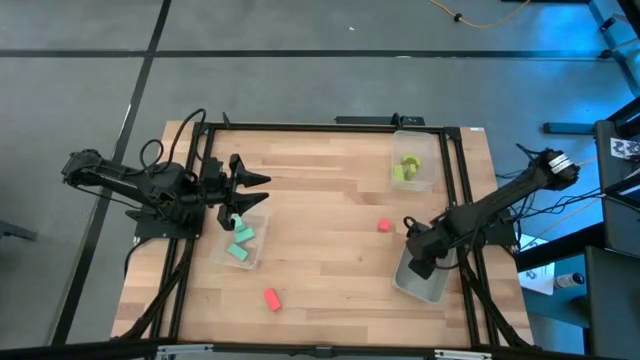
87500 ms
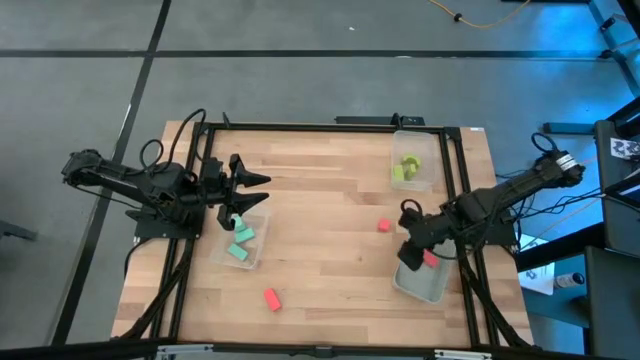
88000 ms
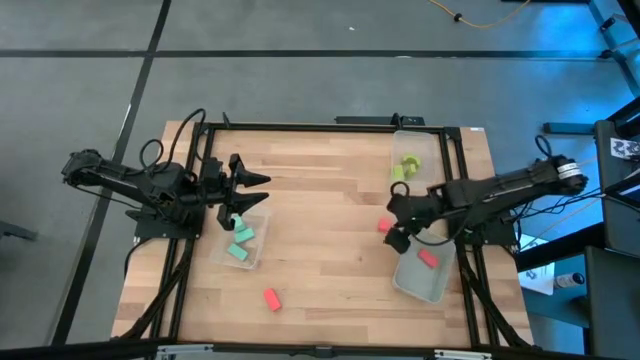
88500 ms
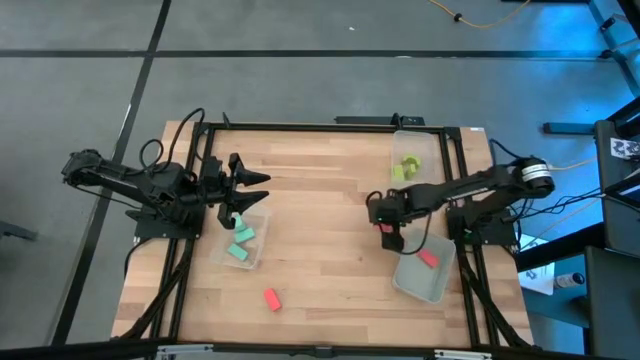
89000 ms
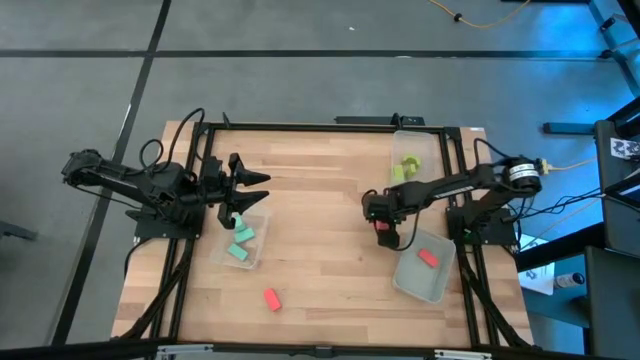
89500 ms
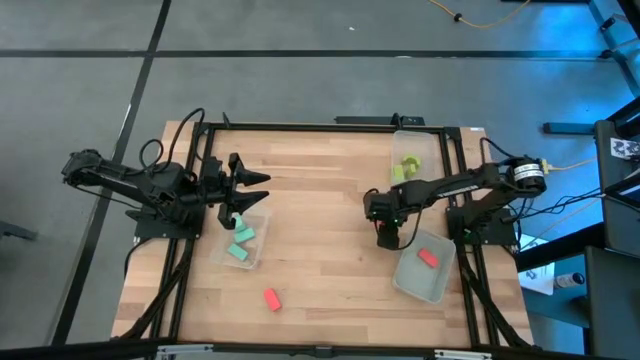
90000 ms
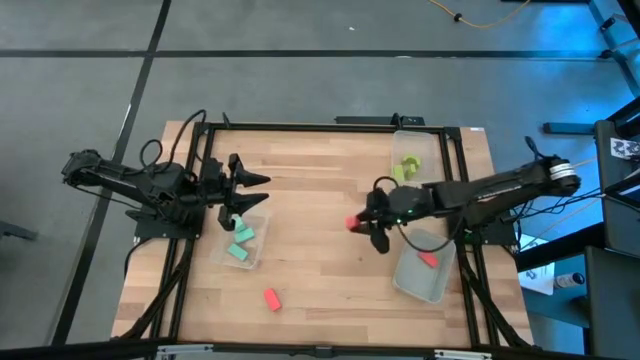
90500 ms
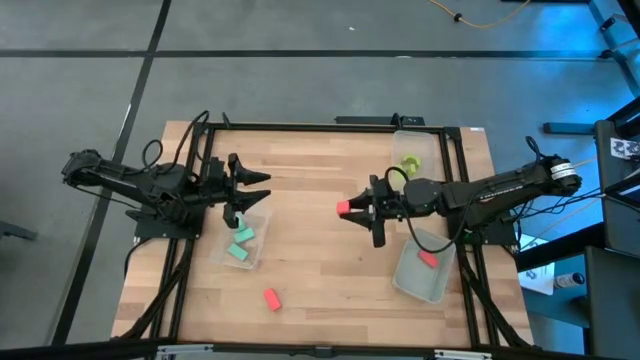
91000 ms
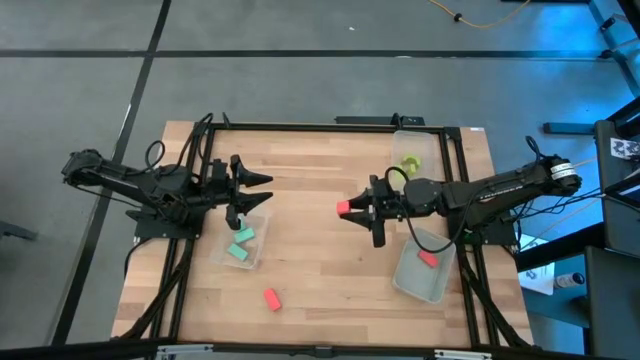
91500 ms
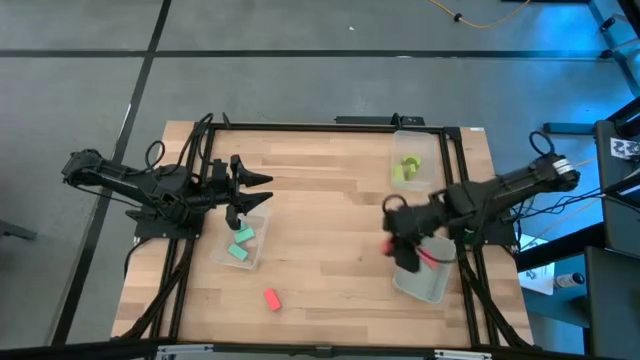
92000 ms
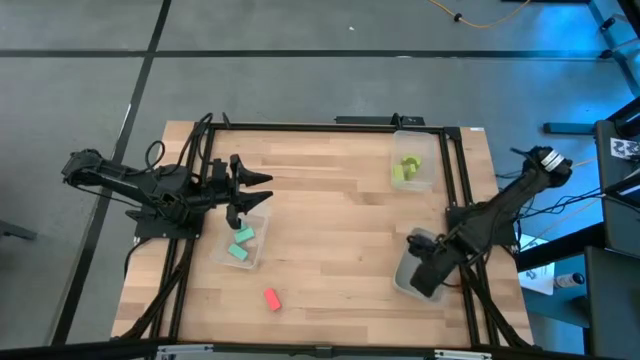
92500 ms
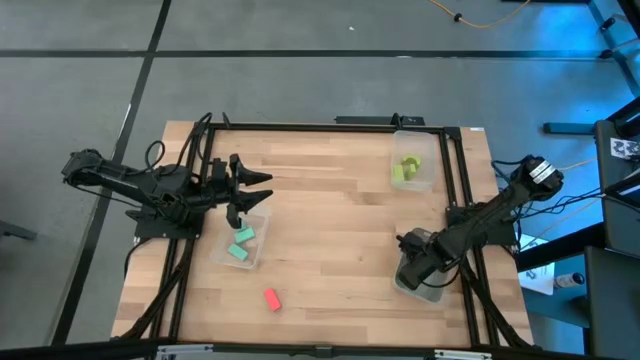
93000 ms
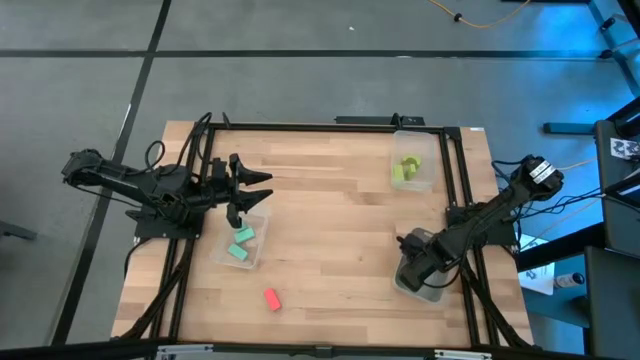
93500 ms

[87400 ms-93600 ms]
Task: Sort & place blocks by color
Put the top orange block into the gray bin

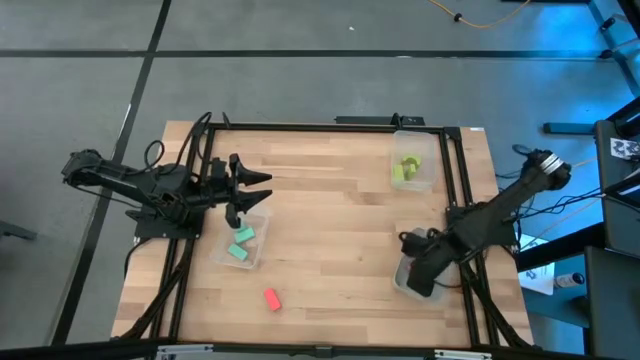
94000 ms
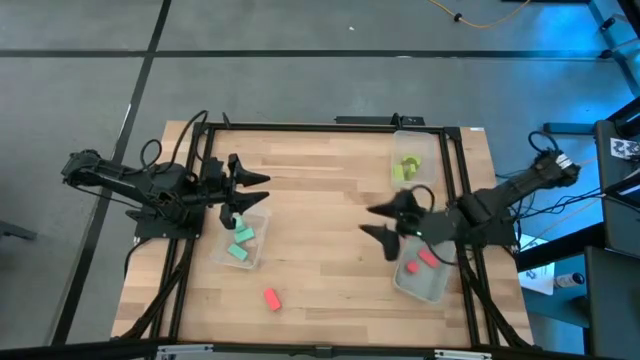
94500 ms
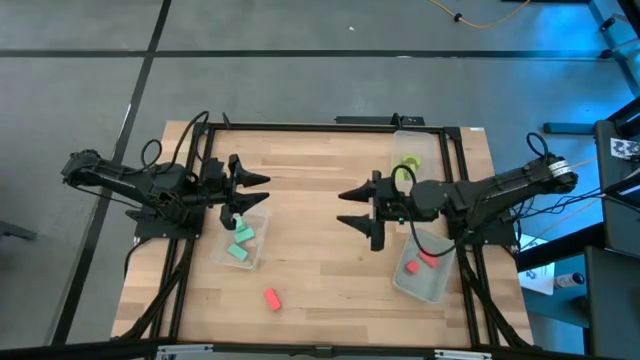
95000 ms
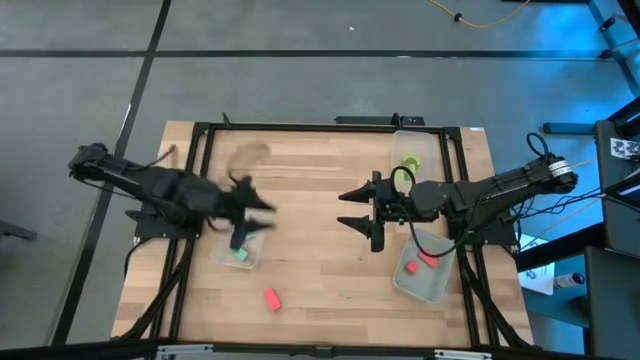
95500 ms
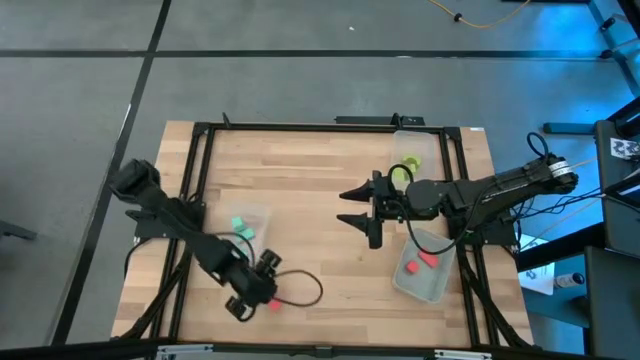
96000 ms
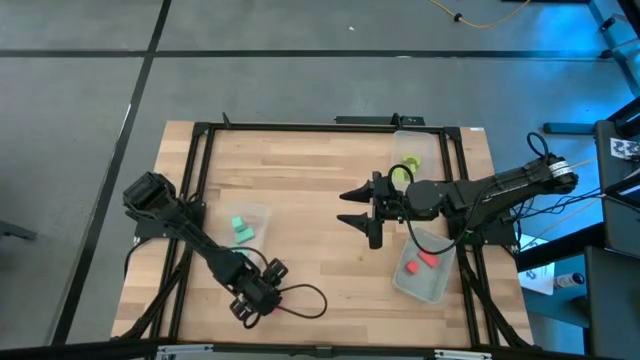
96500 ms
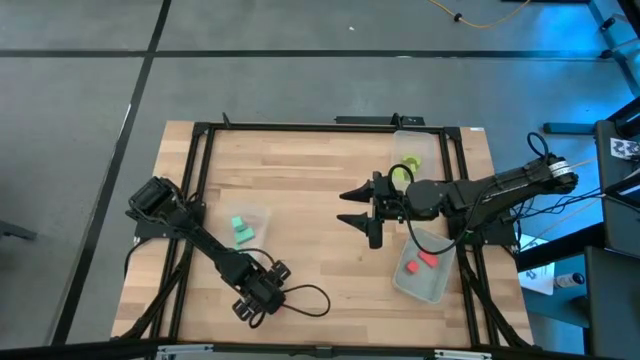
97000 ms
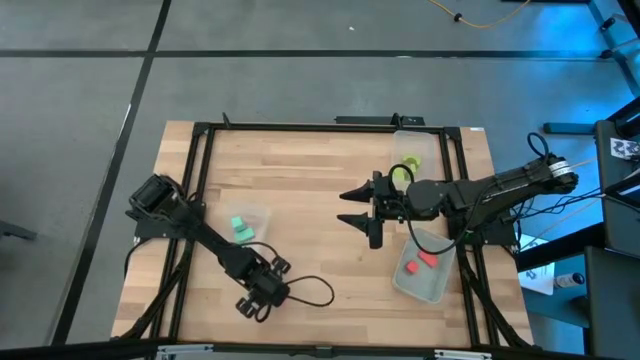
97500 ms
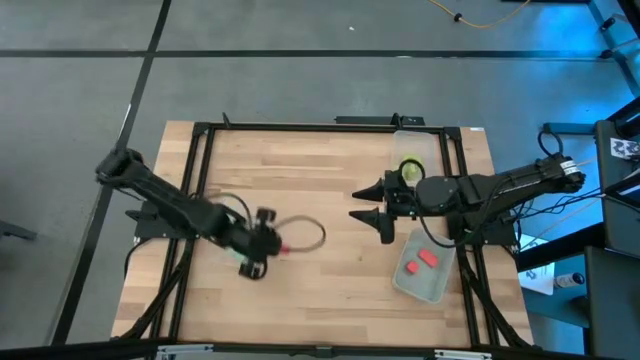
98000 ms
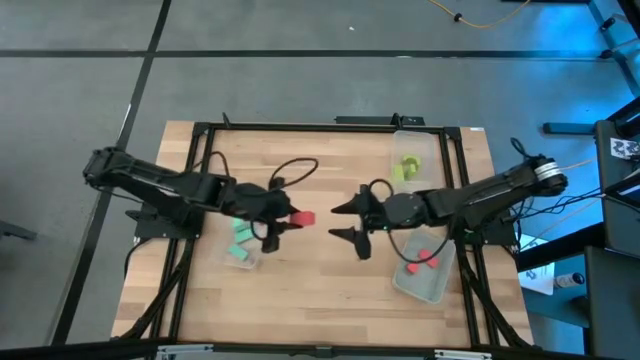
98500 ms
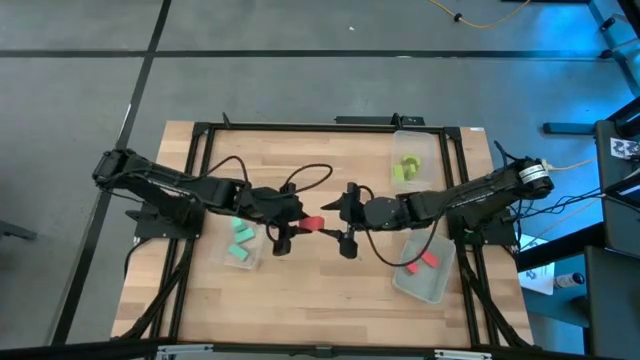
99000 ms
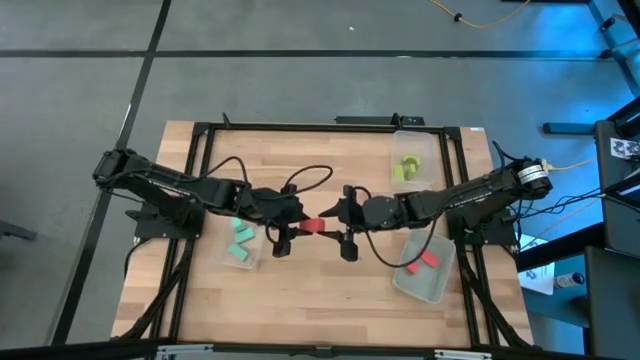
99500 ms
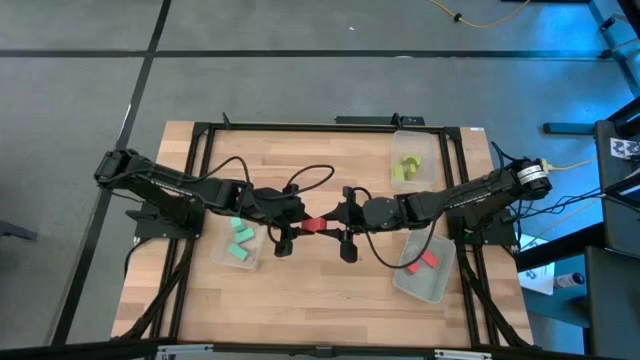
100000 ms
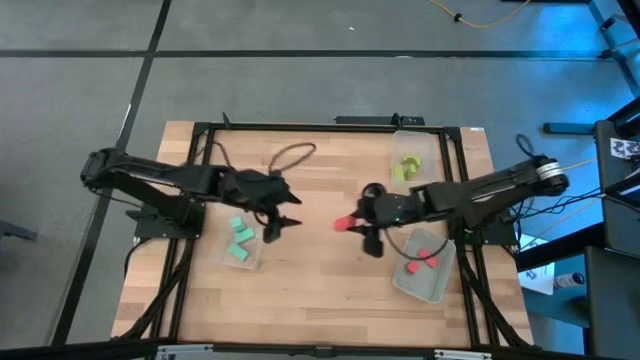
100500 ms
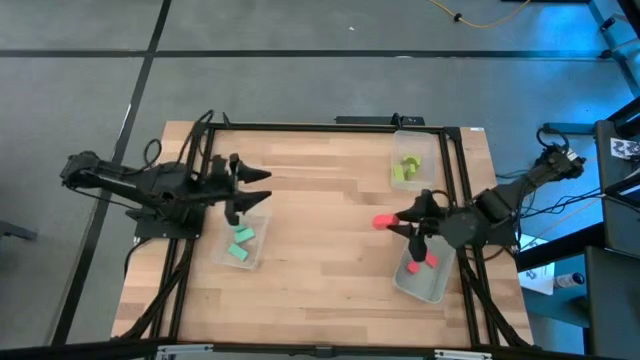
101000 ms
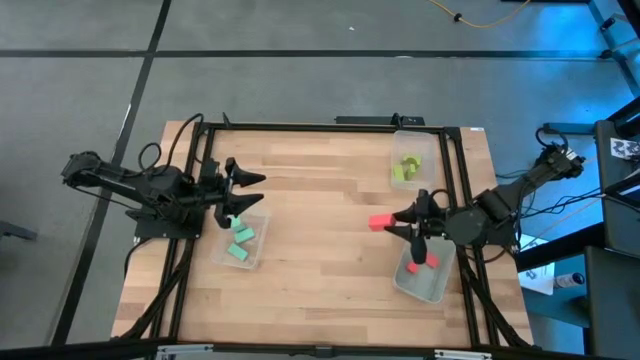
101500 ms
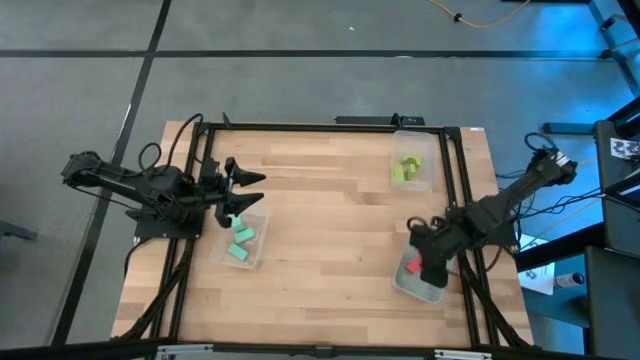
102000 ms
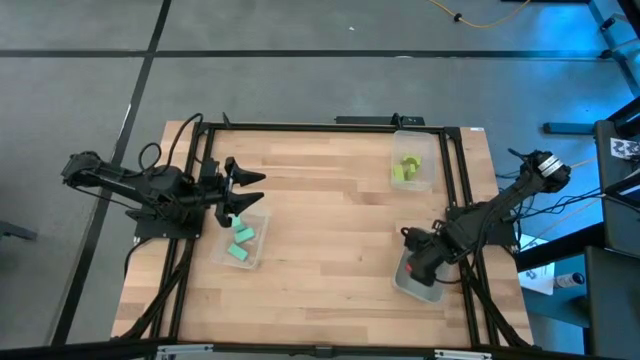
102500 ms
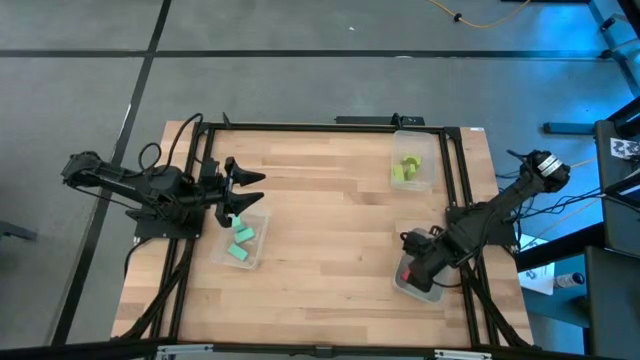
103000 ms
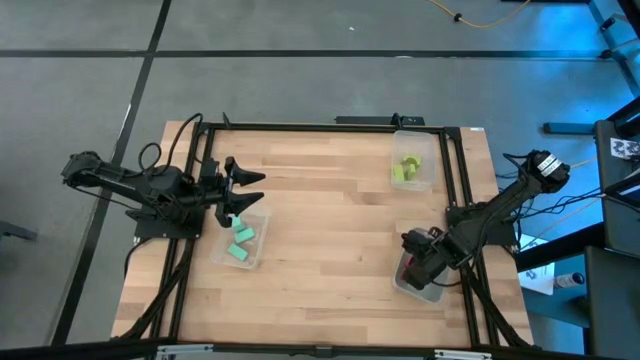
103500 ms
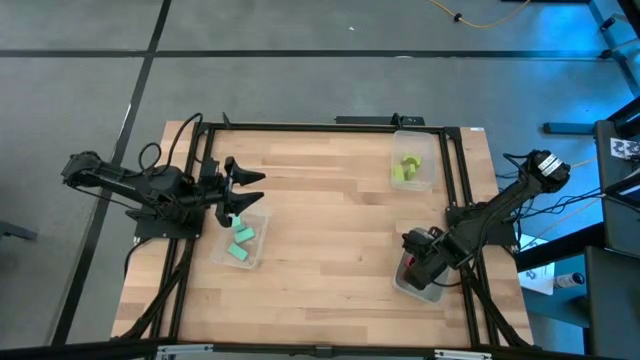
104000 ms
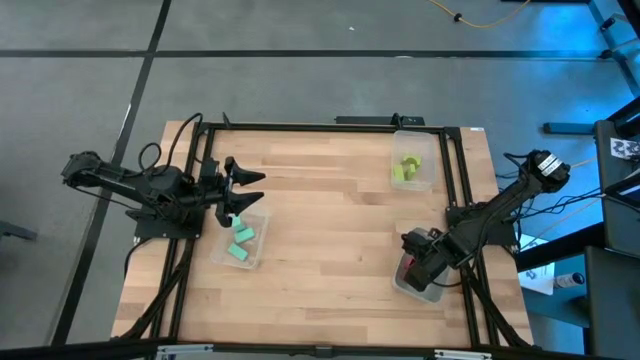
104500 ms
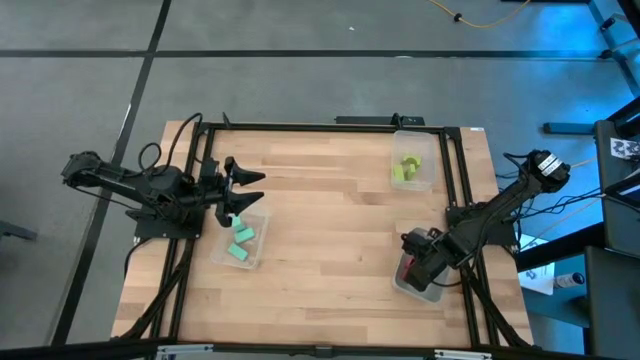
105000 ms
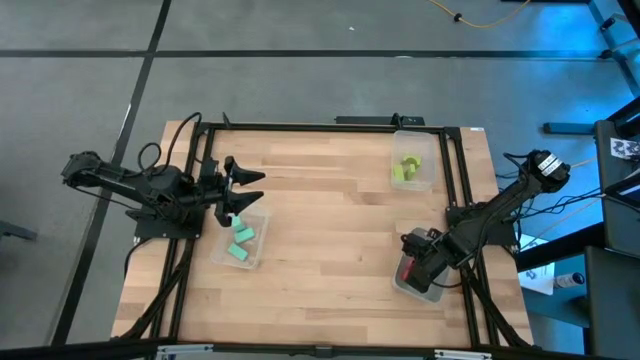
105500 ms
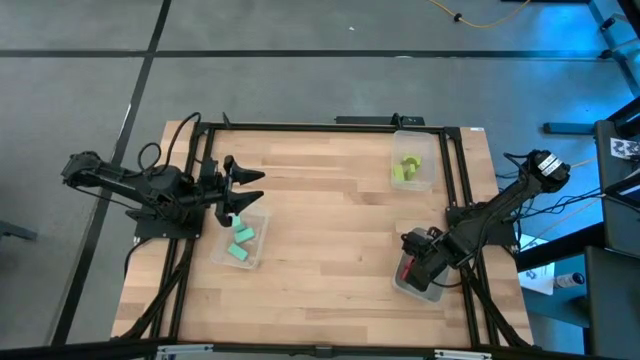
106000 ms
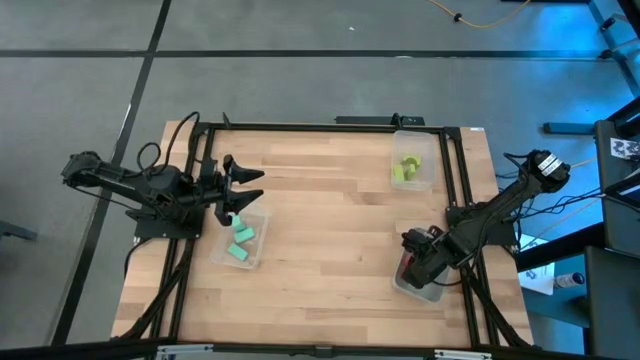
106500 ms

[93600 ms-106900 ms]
Put the orange block into the gray bin

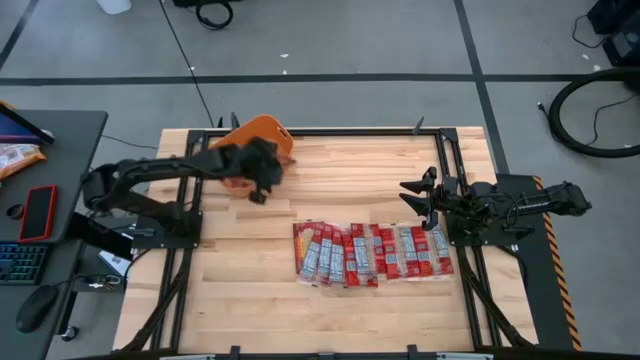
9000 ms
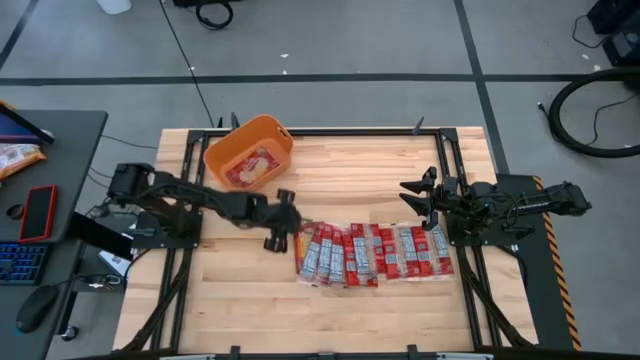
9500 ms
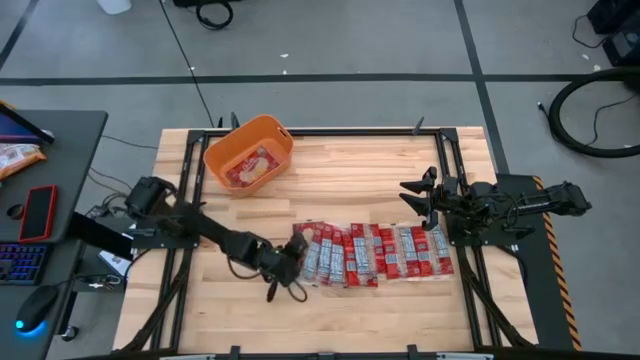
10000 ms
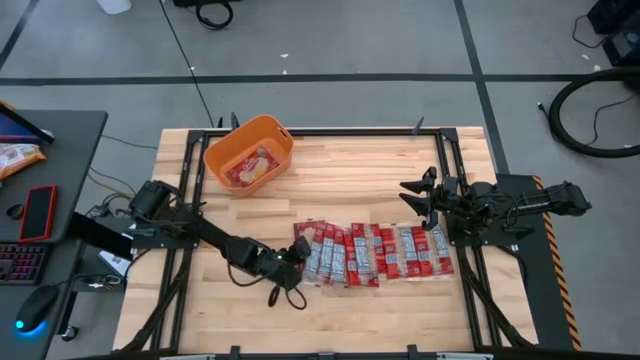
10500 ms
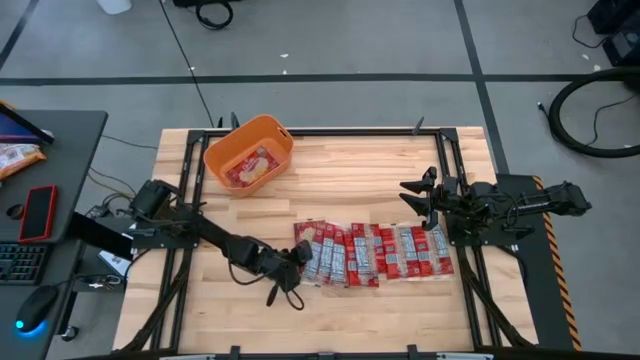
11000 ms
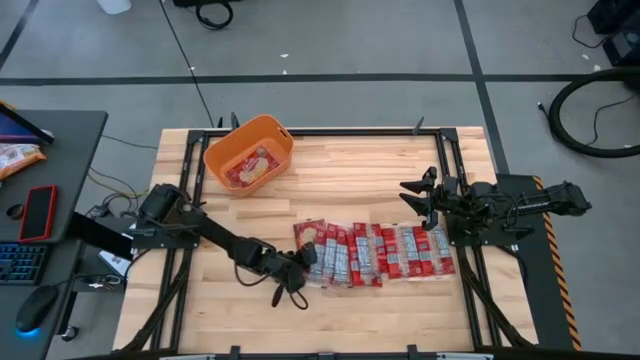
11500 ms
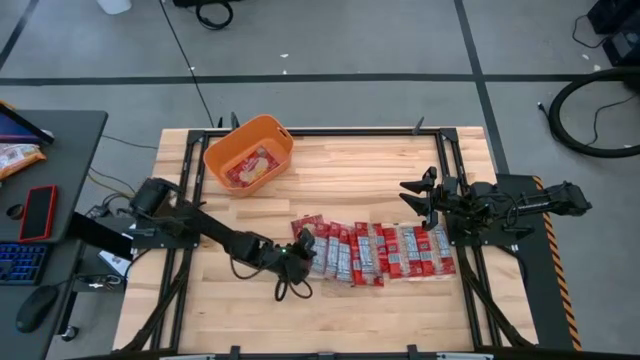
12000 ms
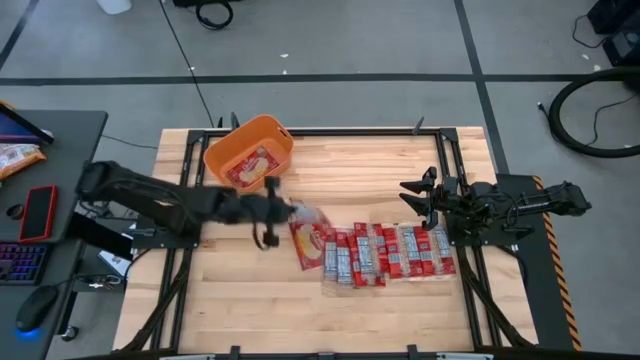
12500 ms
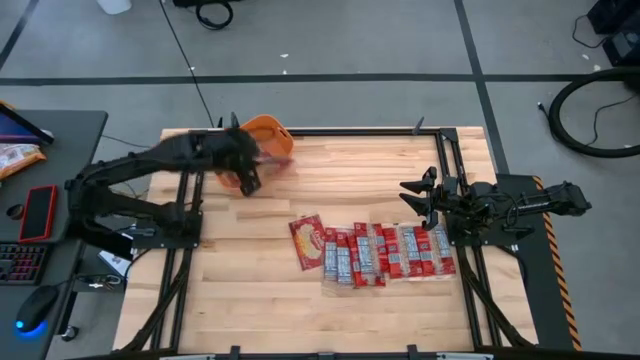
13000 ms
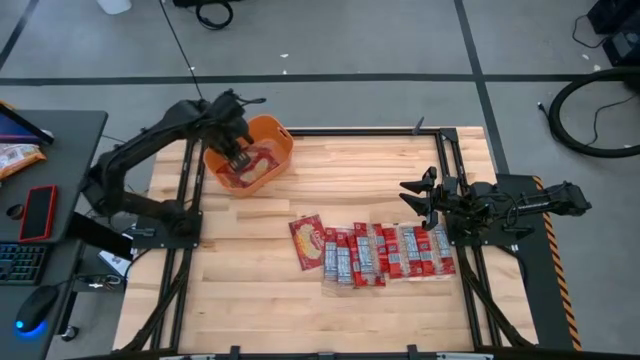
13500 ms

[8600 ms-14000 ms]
Task: Sort popcorn bags into baskets
Put the red popcorn bag into the orange container
